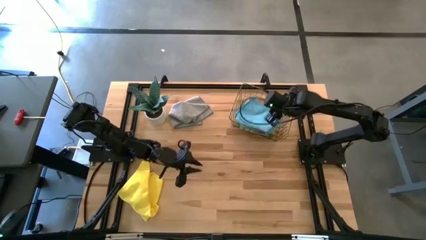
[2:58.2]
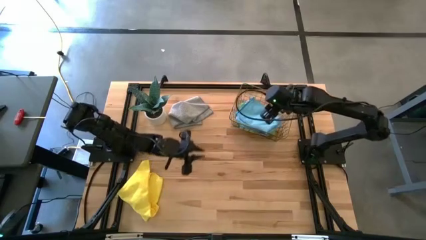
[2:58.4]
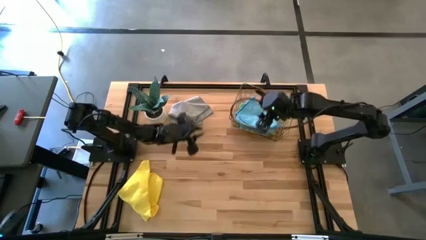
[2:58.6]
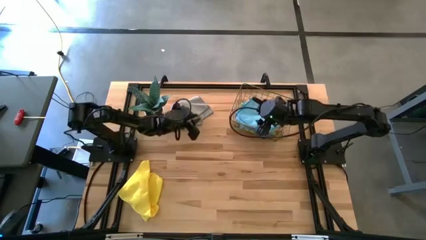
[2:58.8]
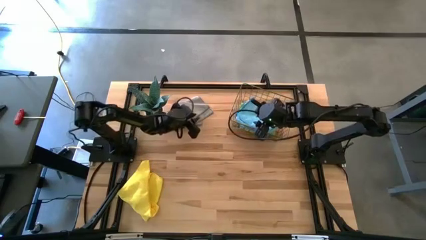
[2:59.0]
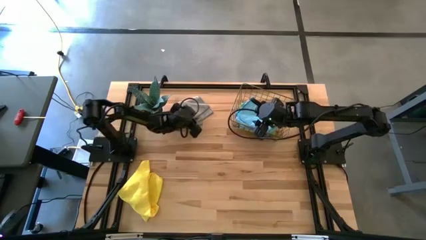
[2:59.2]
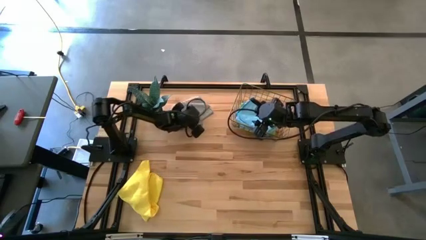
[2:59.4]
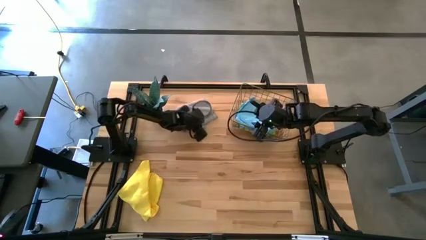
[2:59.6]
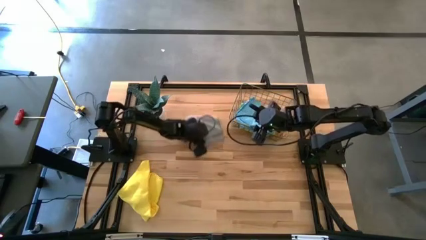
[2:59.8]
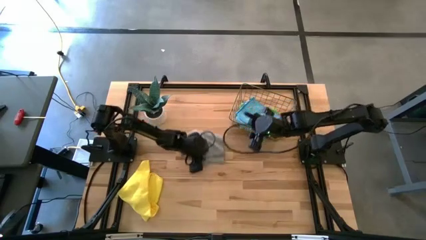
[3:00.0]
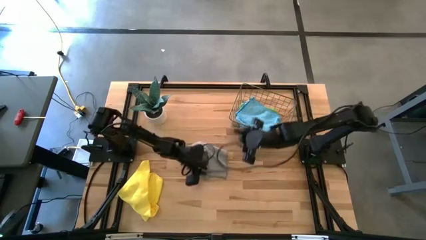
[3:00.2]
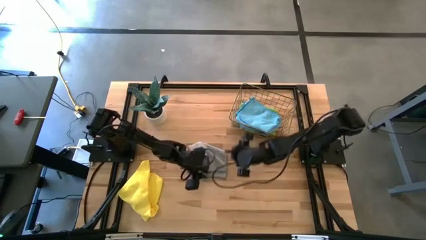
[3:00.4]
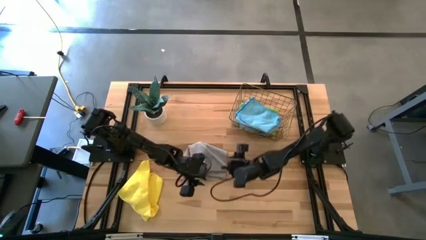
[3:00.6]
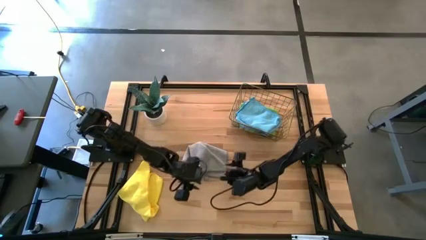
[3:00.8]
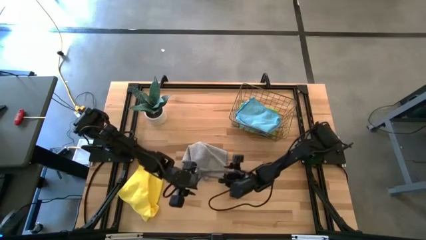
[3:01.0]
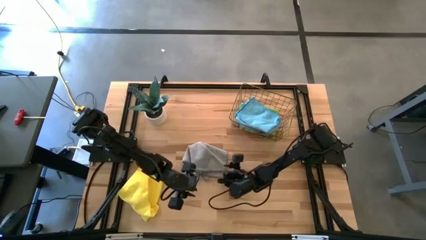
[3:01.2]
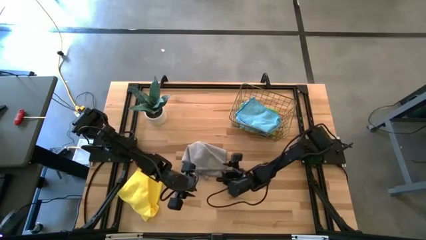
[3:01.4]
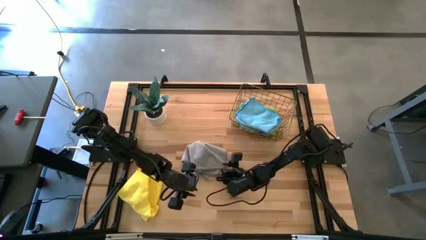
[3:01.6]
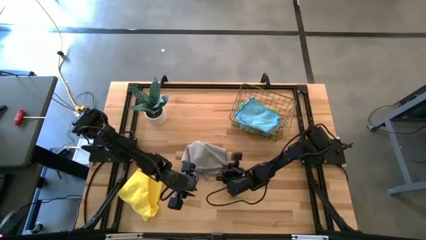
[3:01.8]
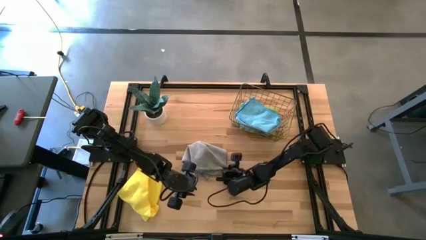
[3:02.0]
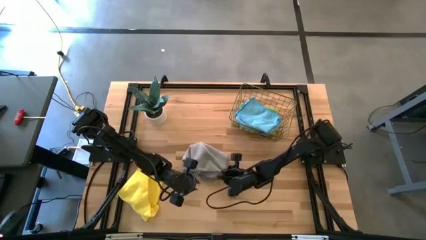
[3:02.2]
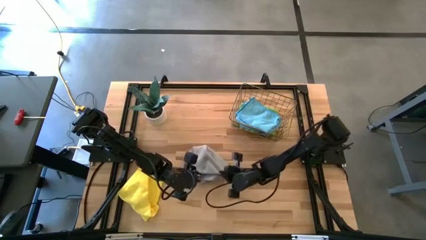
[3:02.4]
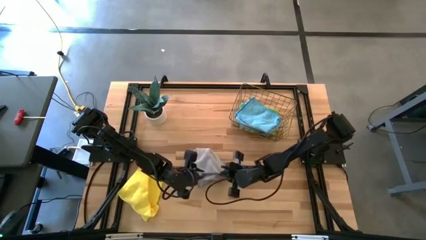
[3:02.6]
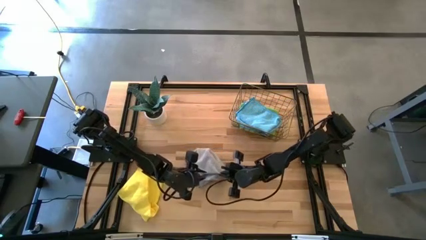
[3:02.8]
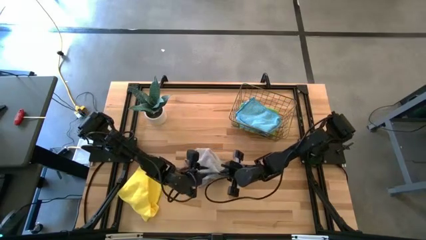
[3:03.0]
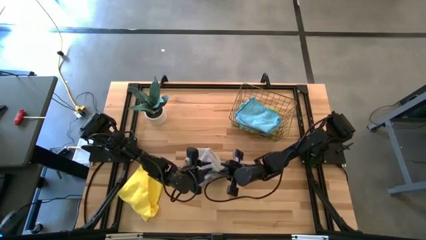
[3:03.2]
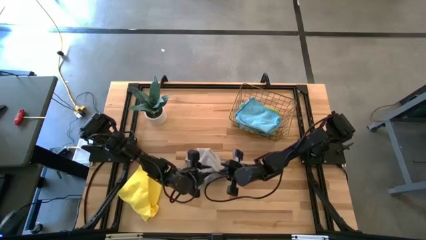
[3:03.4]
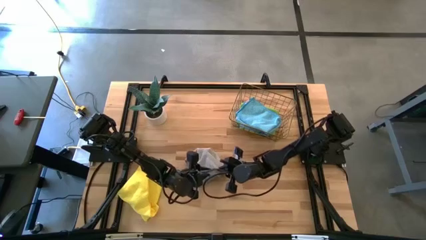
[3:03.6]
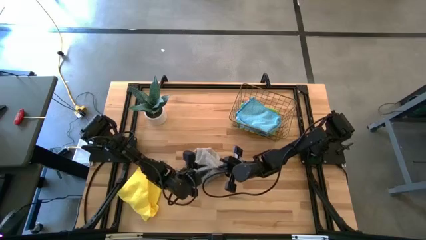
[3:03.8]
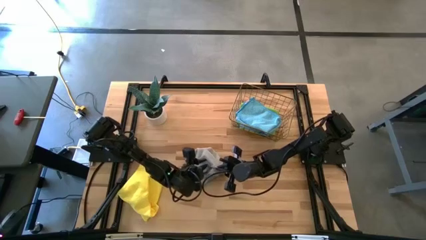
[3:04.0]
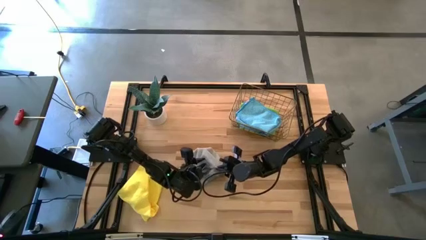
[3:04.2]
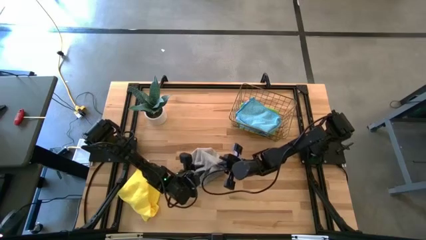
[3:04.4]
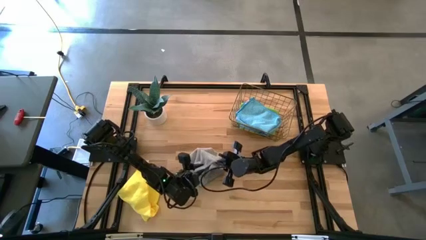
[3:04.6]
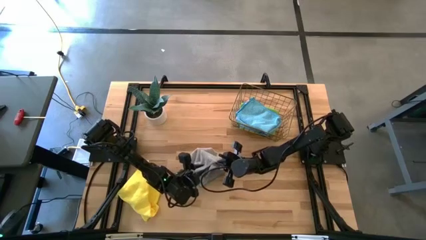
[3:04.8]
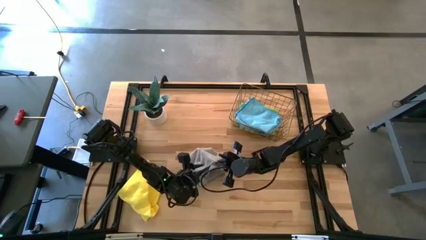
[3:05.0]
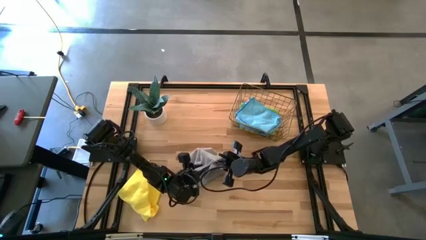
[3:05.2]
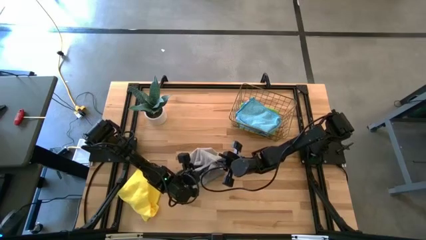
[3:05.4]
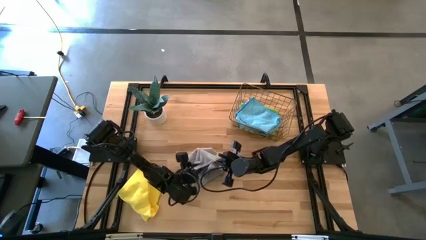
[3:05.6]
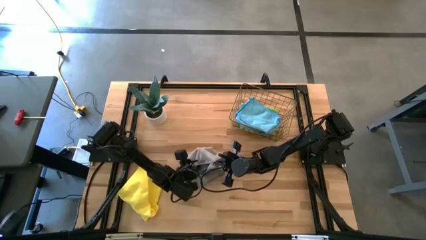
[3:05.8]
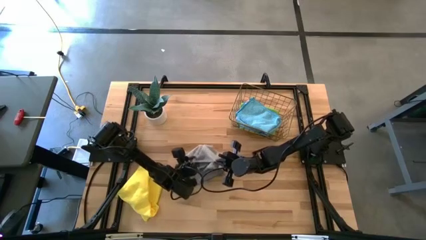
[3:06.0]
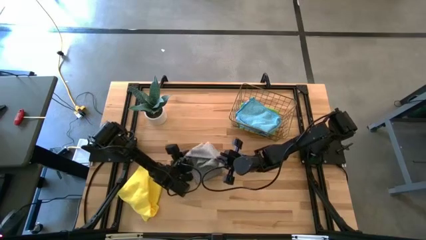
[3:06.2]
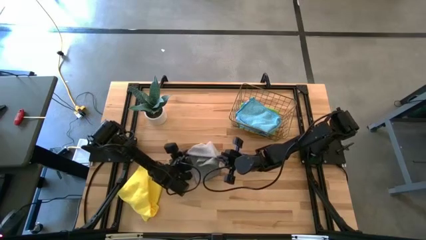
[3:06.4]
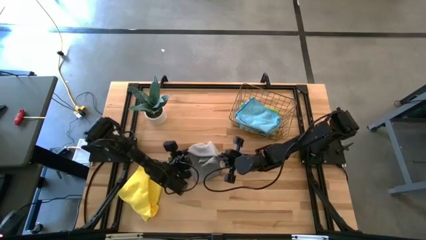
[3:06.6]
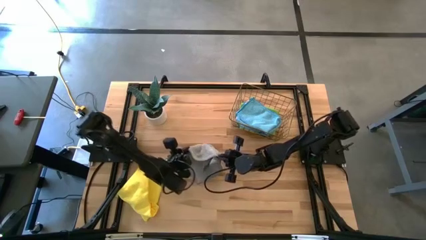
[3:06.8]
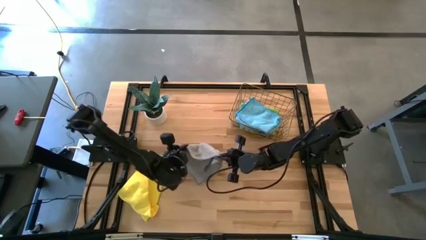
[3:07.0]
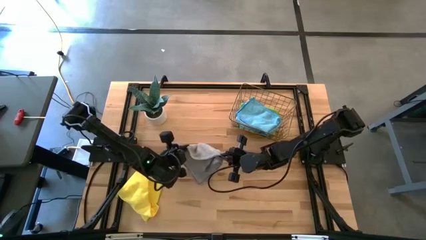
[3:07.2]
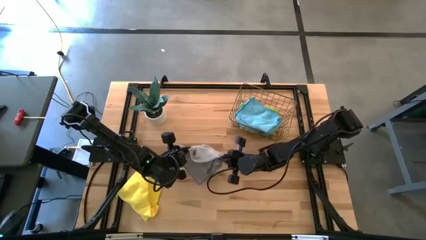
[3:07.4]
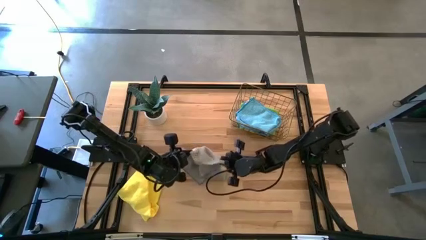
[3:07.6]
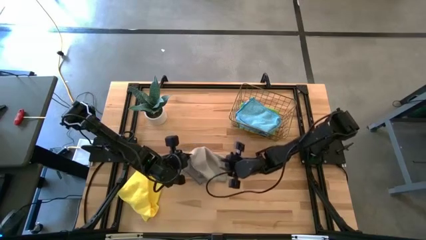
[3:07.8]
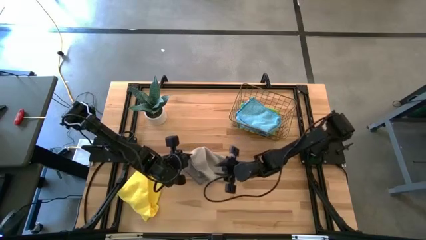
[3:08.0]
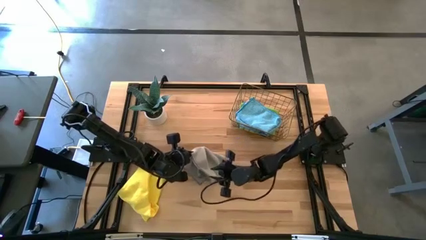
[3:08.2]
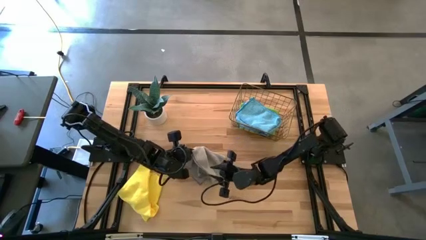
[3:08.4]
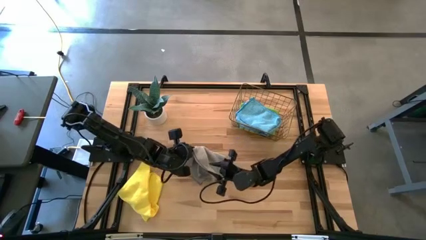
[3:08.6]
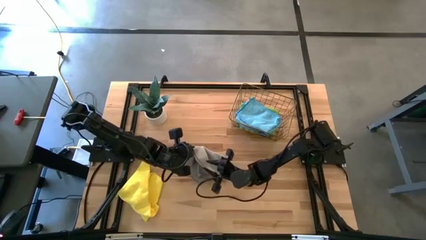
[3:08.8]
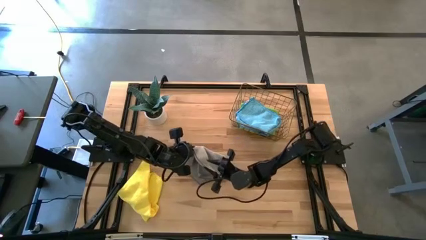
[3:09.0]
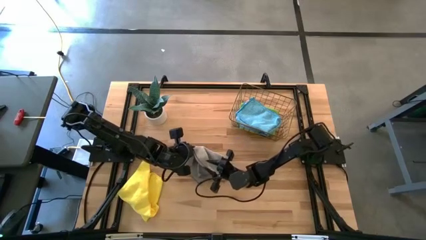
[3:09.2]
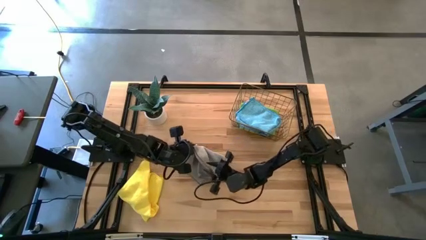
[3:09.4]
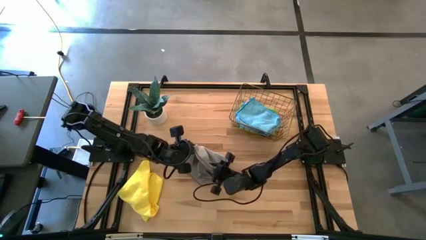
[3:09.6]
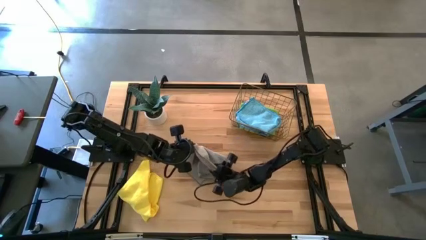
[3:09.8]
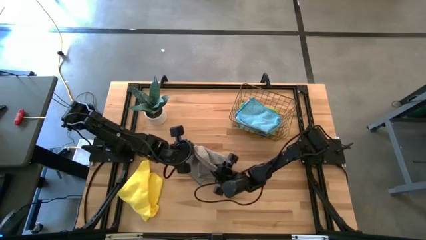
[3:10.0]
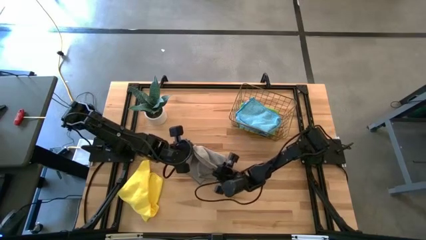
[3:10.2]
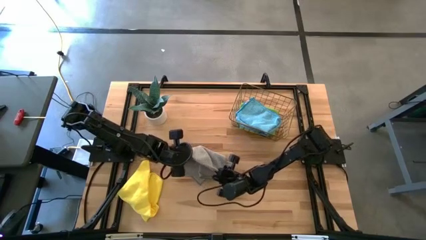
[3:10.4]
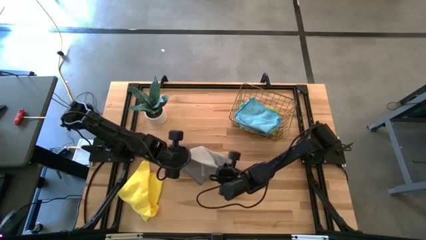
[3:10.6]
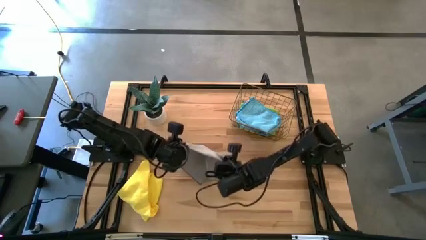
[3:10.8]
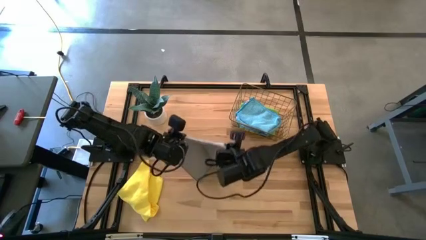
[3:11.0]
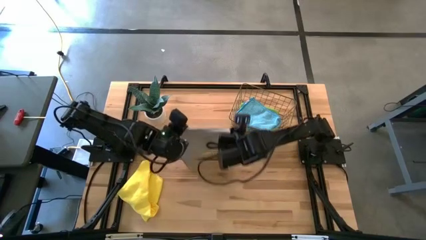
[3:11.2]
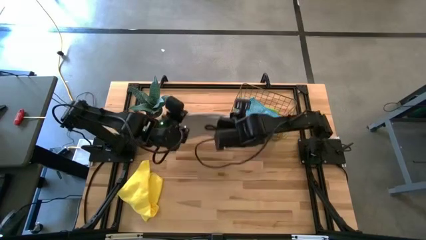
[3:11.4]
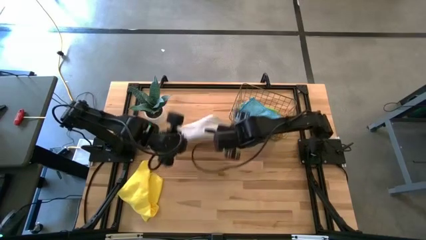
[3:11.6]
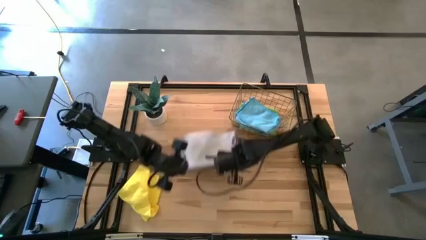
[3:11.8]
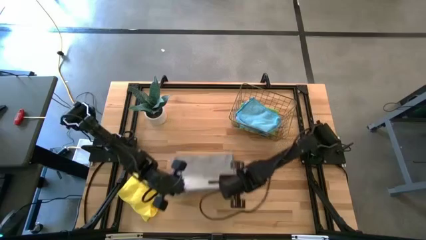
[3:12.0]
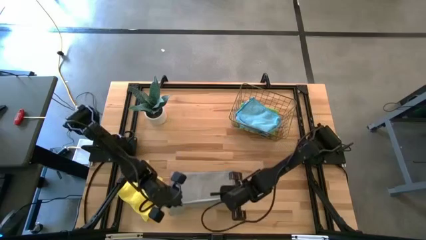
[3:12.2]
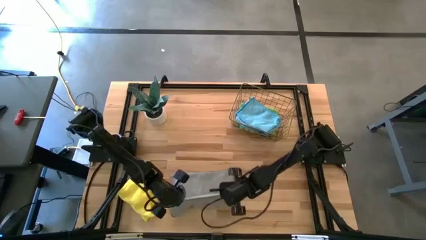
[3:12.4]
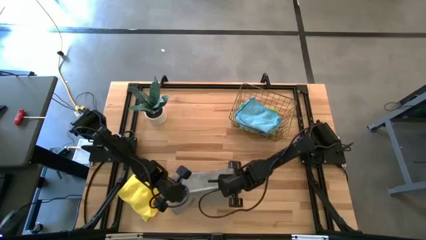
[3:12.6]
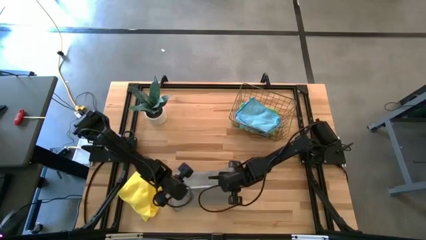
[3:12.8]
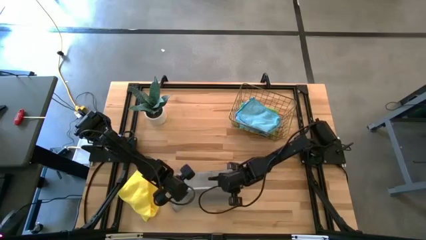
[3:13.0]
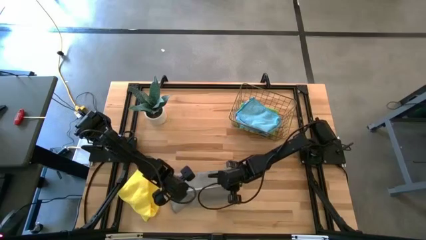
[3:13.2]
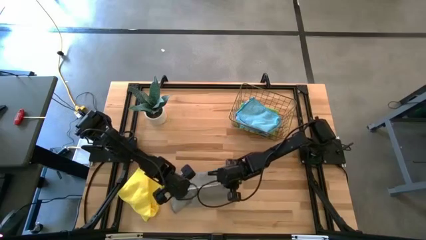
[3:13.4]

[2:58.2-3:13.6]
Task: Fold microfiber towels
Fold the gray microfiber towel
